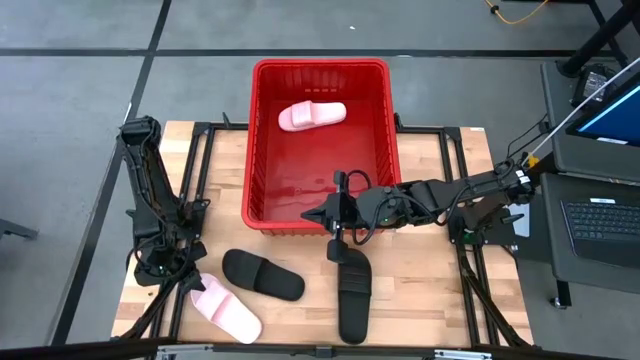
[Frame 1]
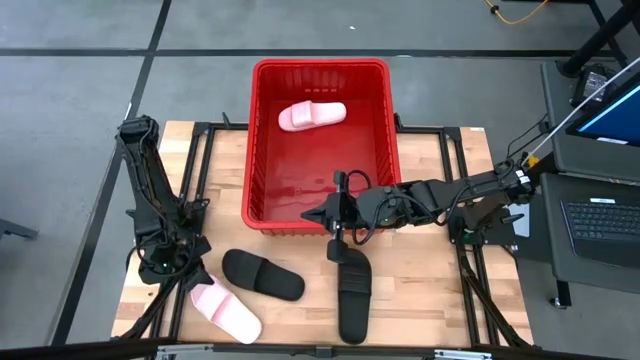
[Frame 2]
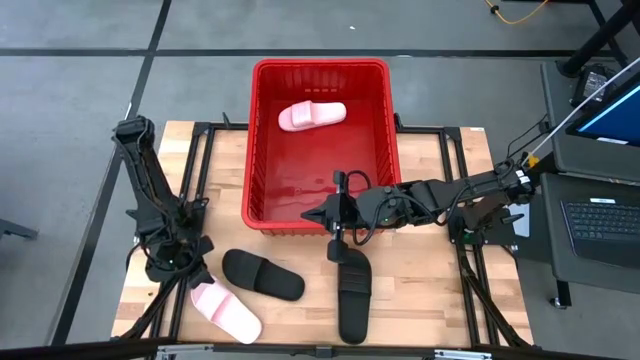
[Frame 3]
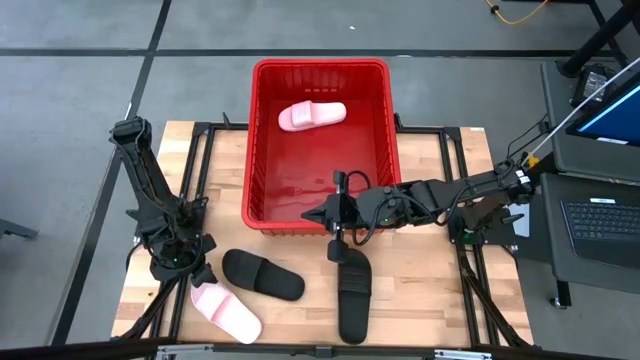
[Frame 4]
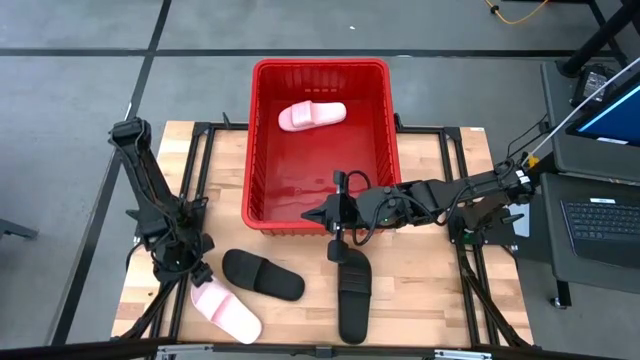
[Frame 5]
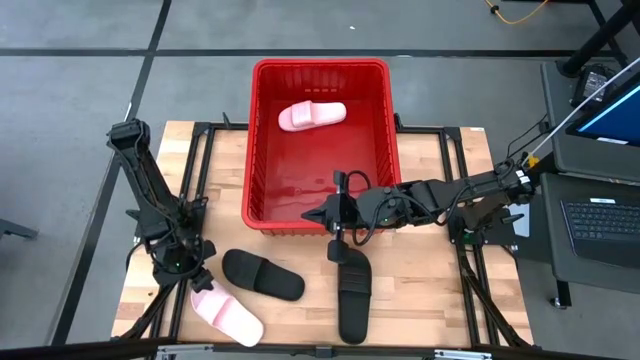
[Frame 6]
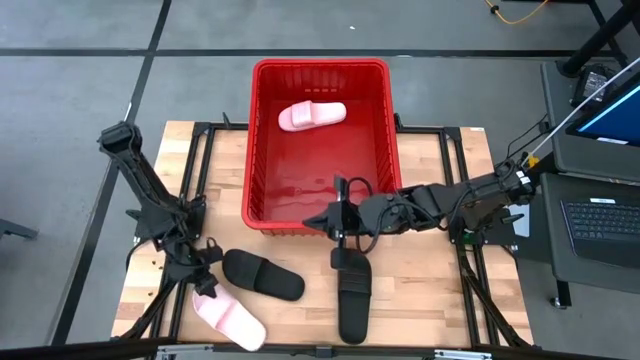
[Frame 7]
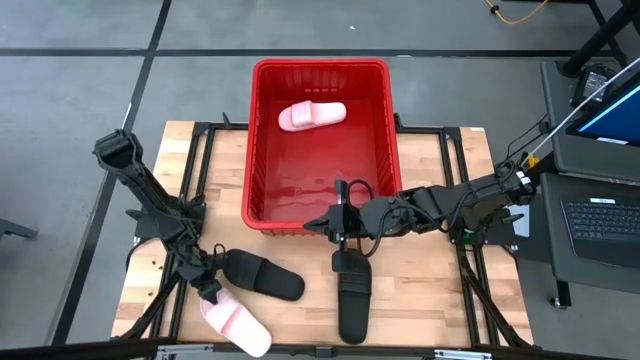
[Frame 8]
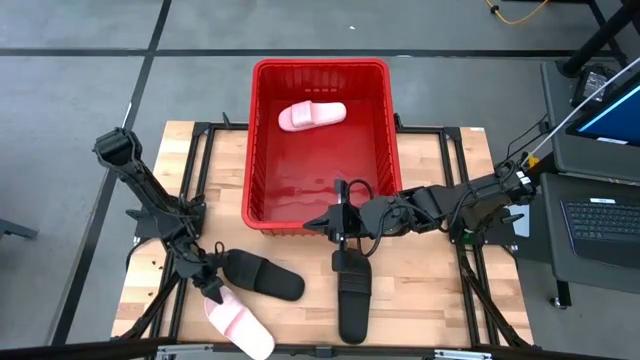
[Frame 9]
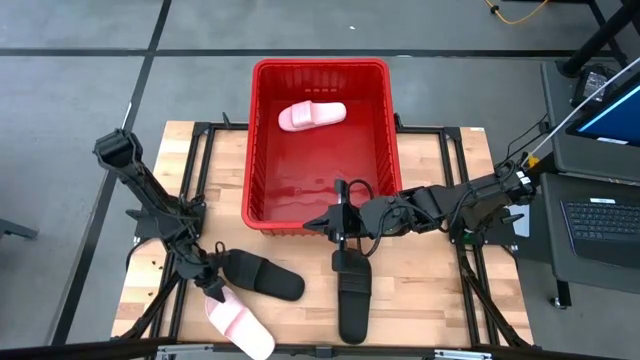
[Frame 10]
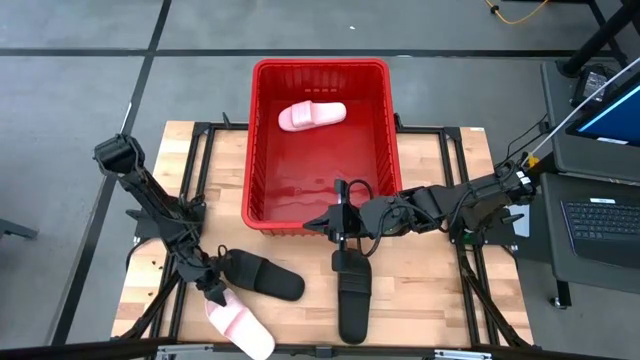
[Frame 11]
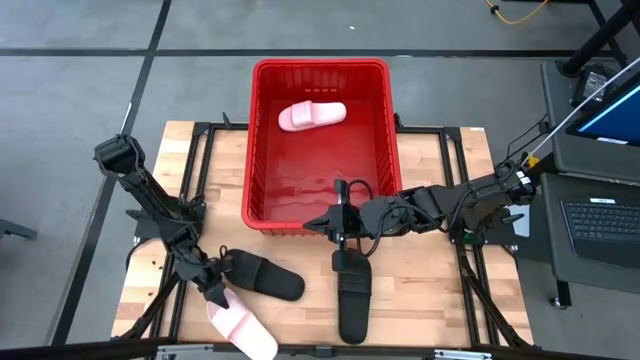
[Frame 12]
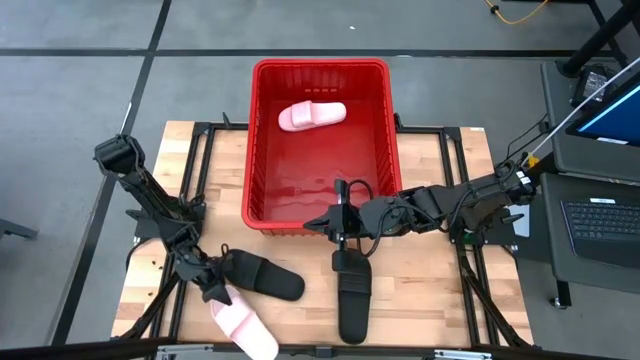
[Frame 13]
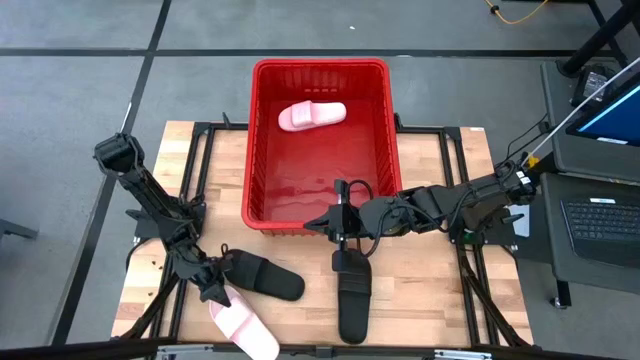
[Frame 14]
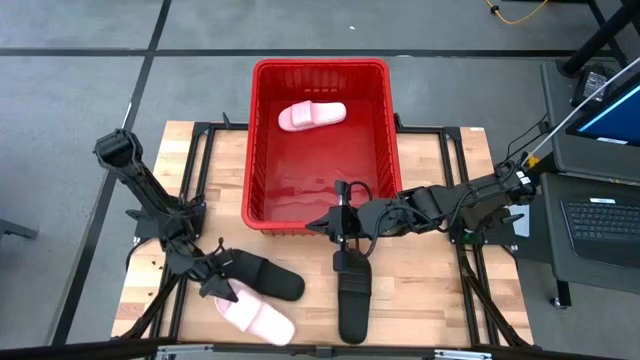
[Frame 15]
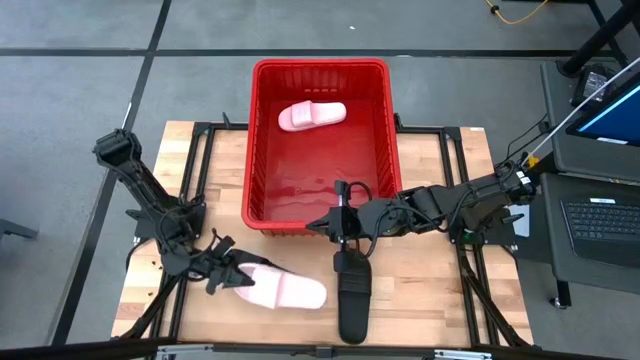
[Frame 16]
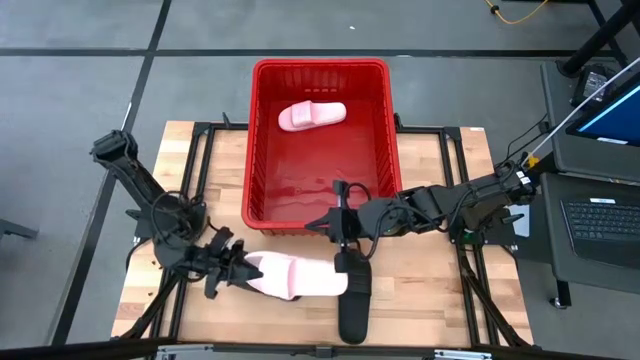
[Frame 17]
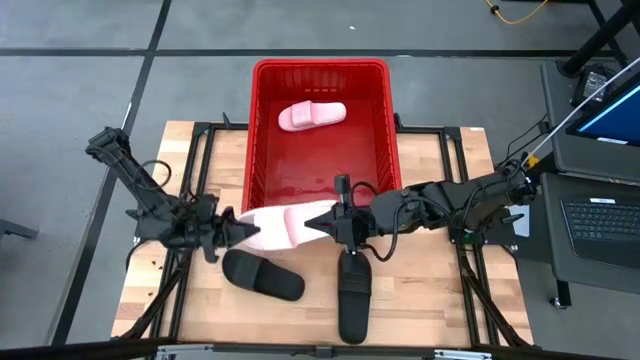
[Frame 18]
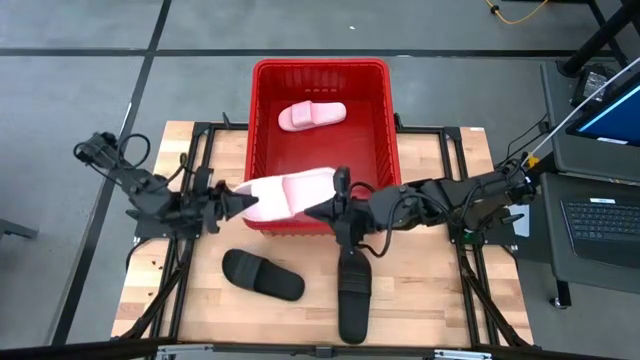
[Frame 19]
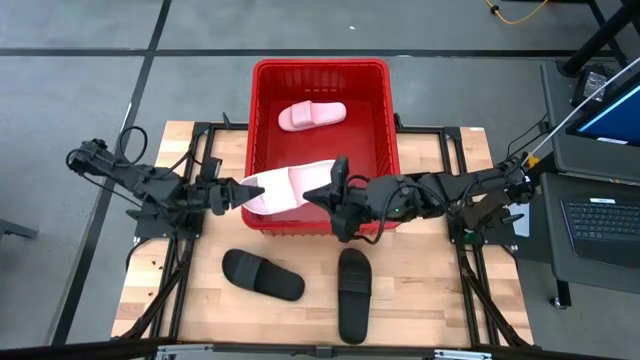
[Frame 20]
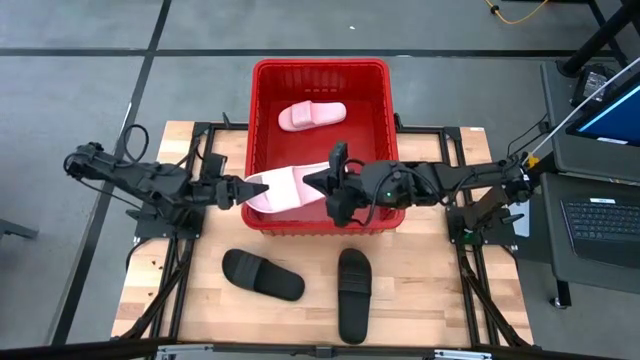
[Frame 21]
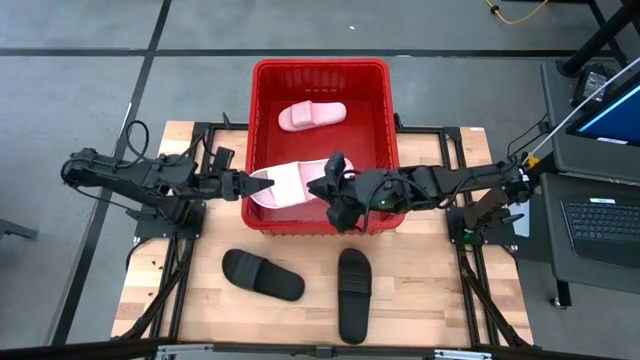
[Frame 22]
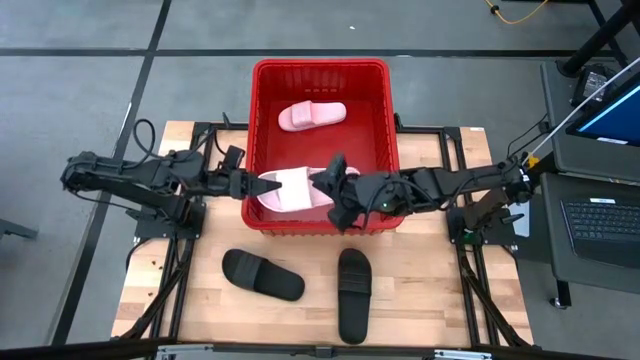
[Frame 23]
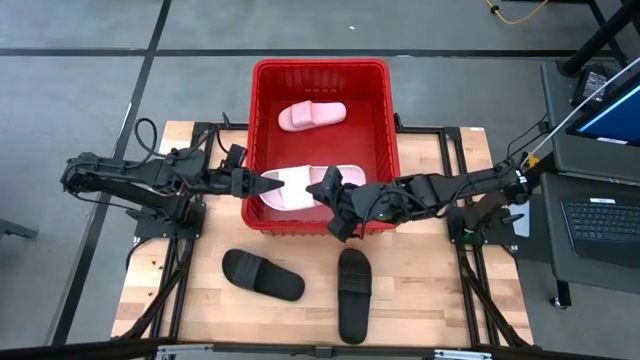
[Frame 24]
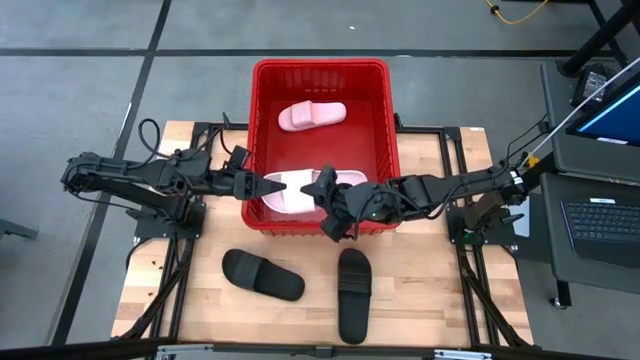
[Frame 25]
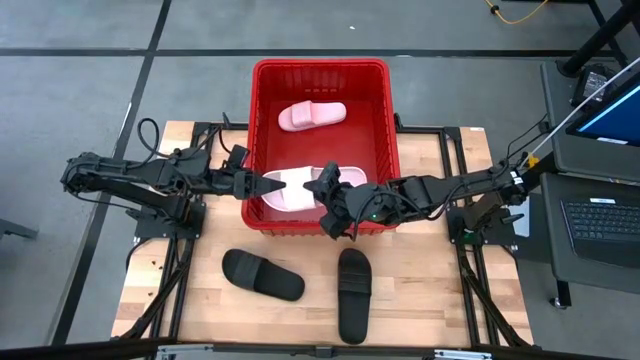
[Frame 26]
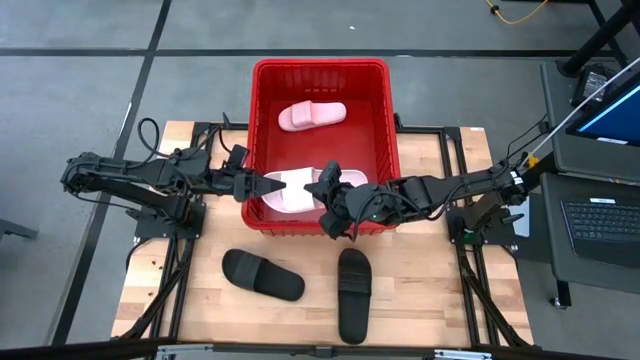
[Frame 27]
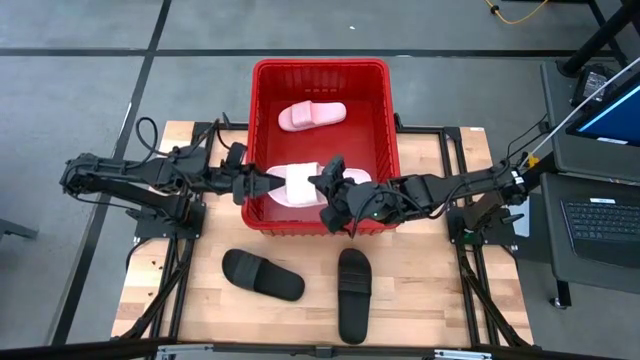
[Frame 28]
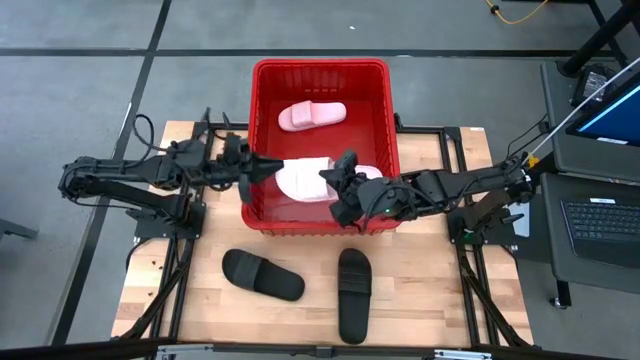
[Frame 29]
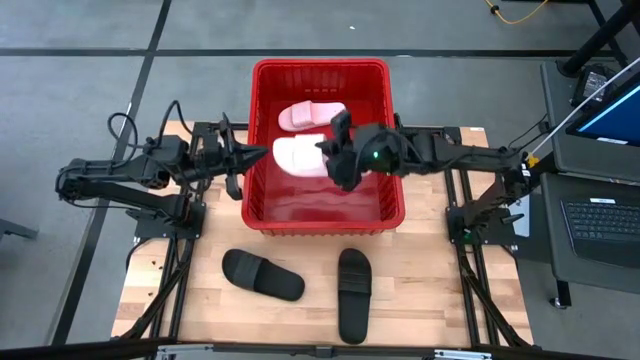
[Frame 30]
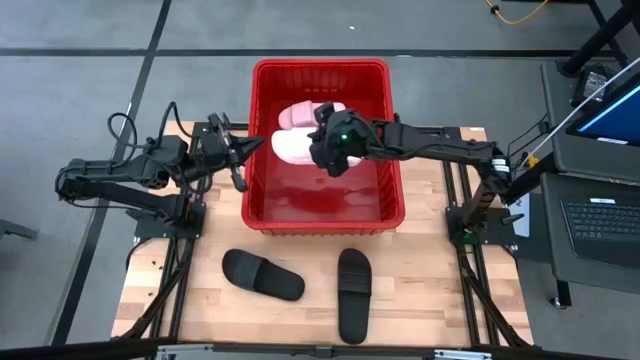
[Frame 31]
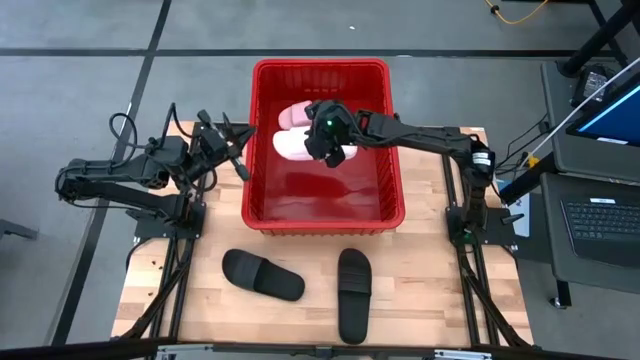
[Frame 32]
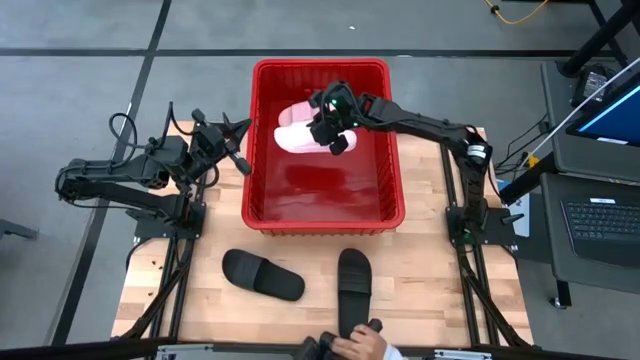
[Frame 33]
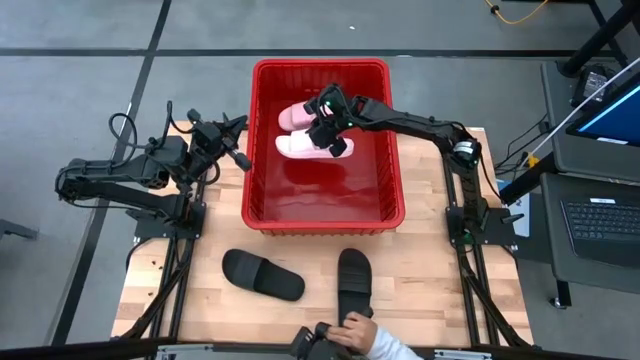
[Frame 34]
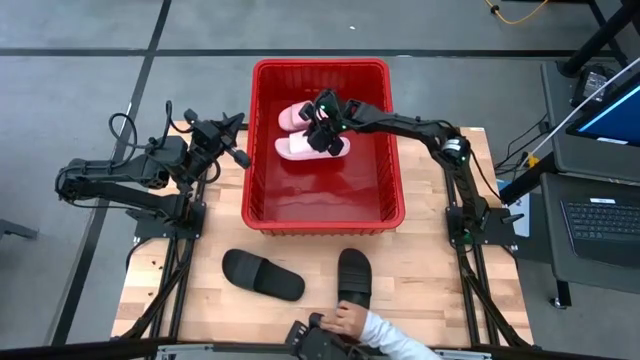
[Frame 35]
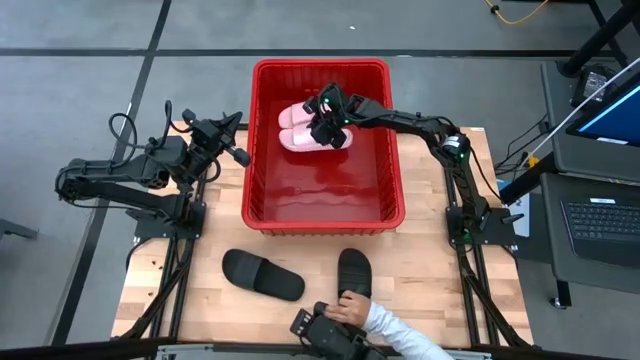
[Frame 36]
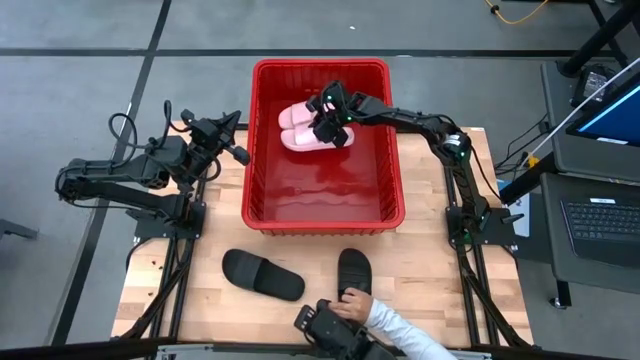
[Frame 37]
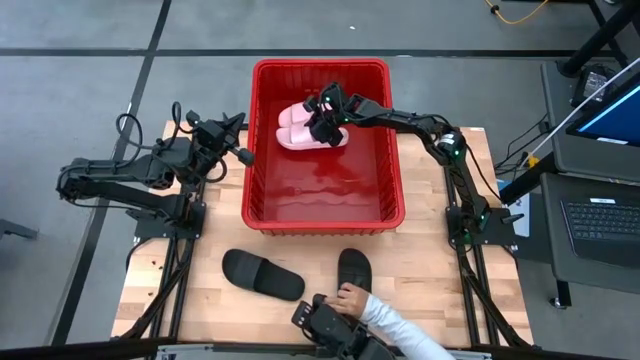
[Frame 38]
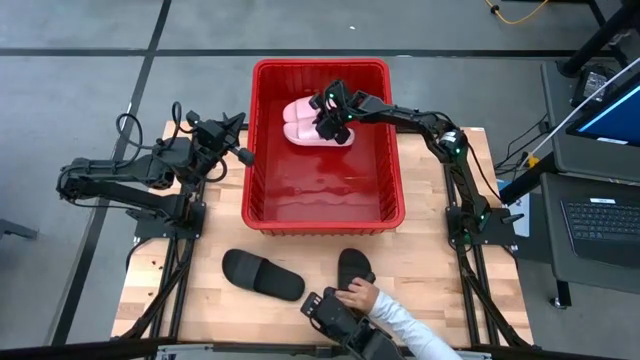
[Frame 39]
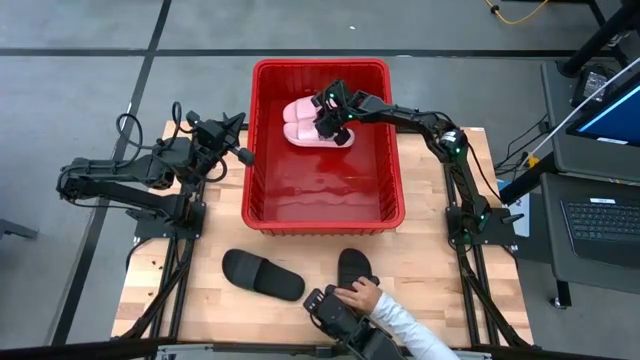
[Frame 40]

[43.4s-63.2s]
Task: Pick and place slides into bin
Put the pink slide into the bin

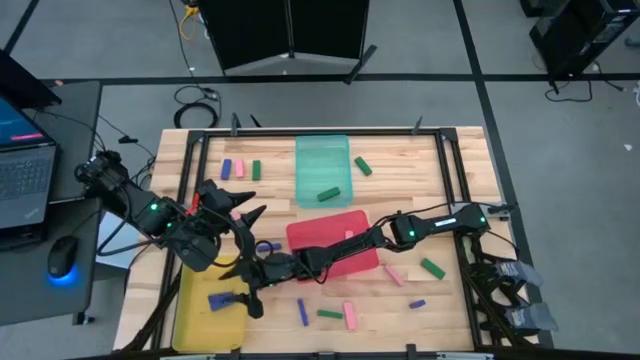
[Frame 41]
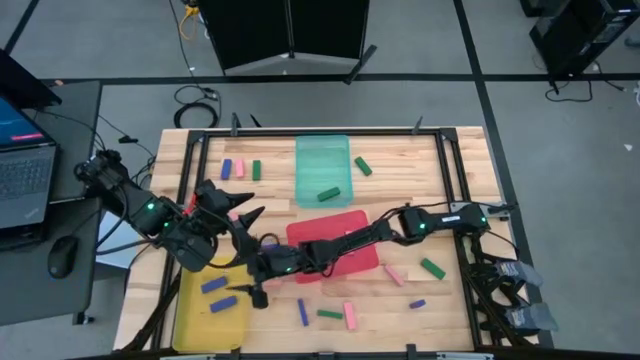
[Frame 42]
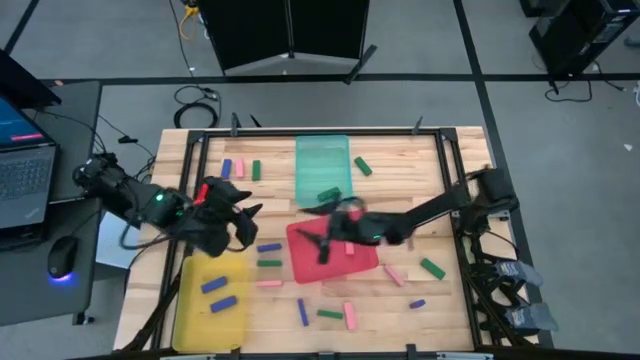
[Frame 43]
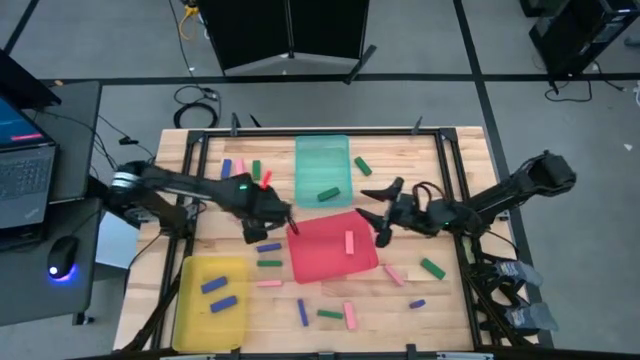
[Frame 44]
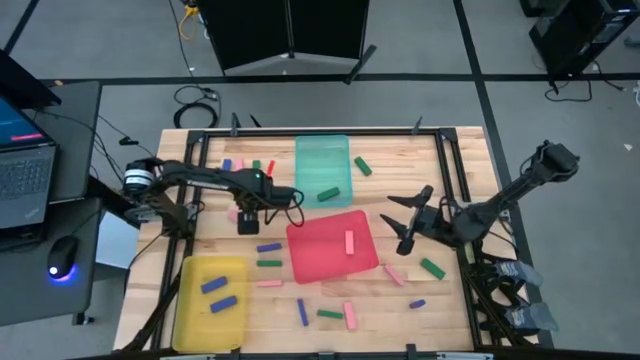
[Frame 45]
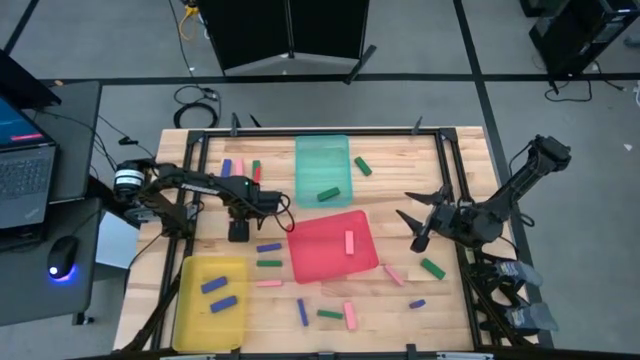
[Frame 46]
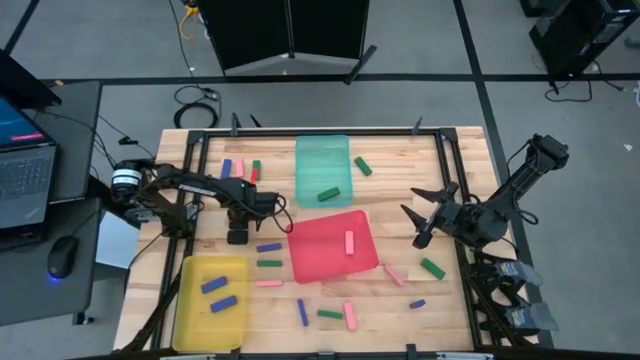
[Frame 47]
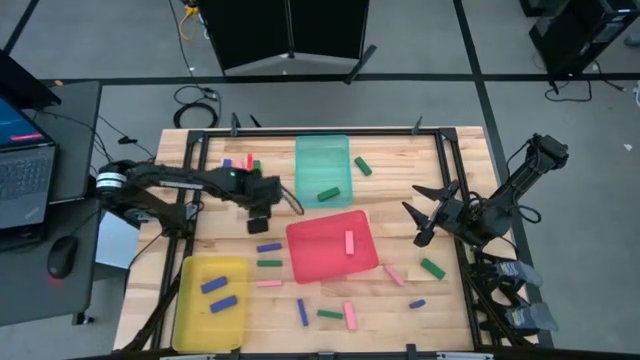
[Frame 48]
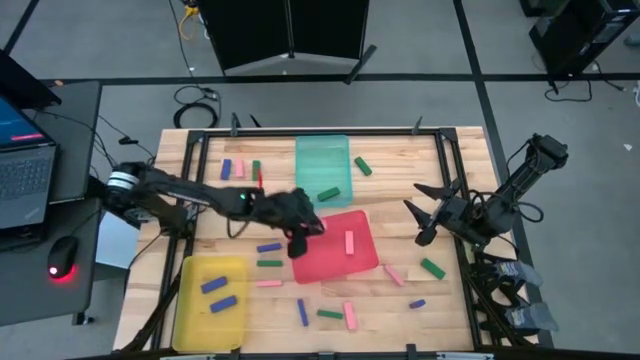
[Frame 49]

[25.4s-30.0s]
Task: Sort blocks
Put the pink block into the pink bin
